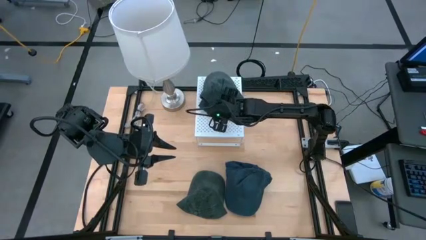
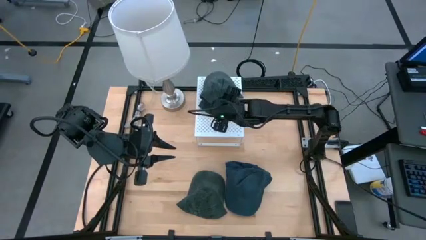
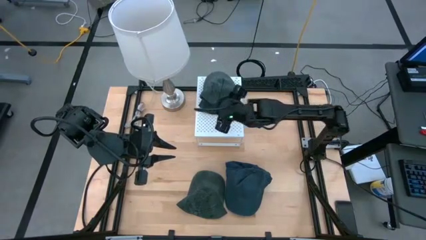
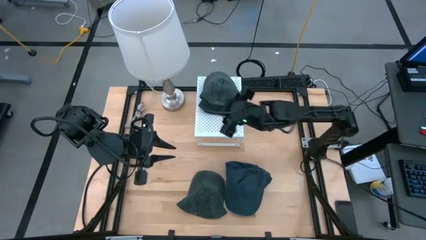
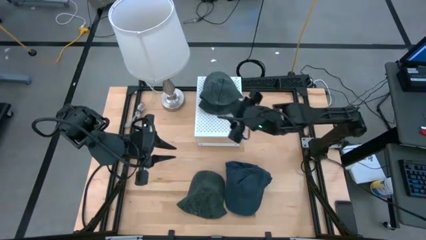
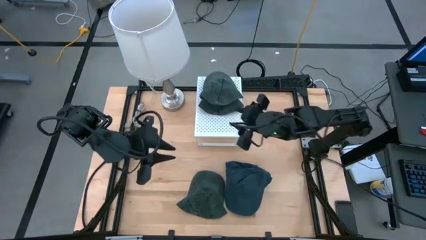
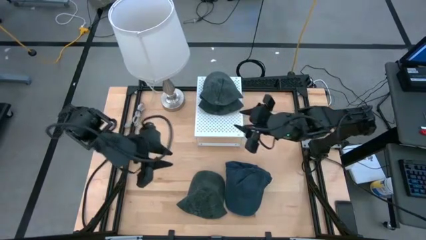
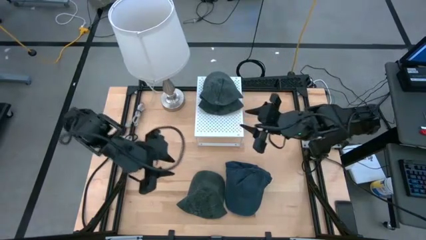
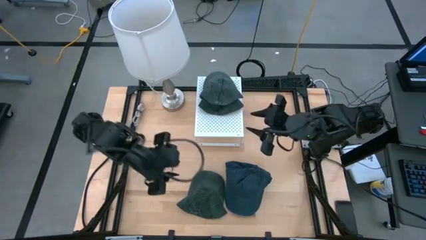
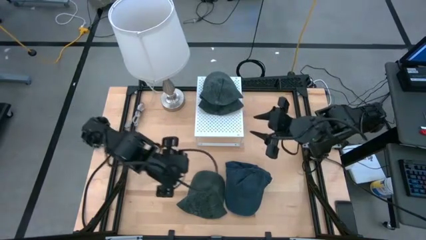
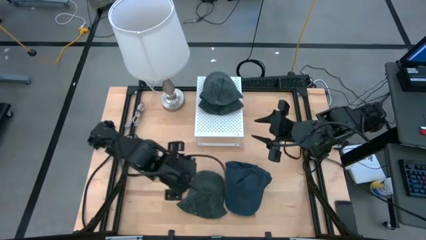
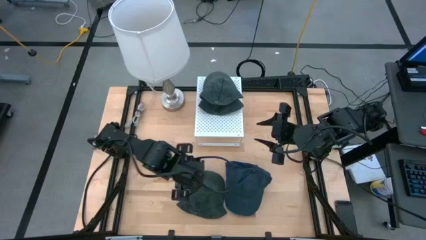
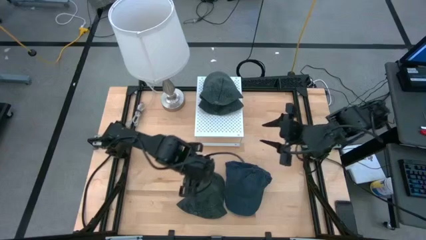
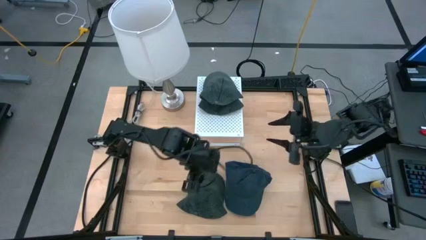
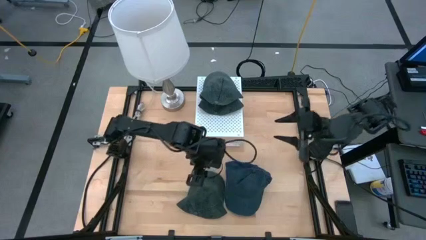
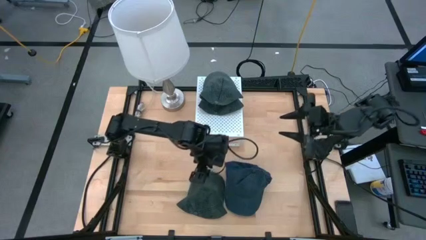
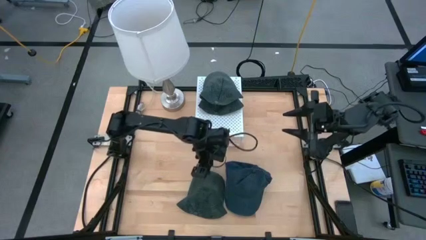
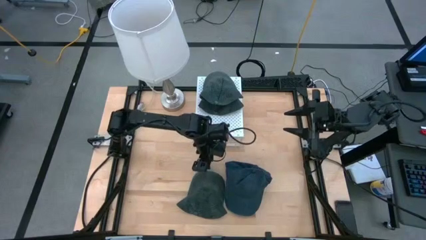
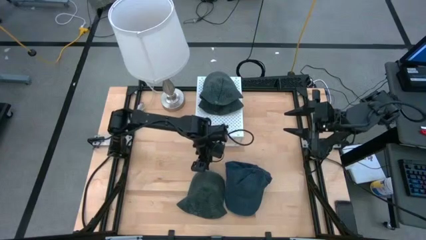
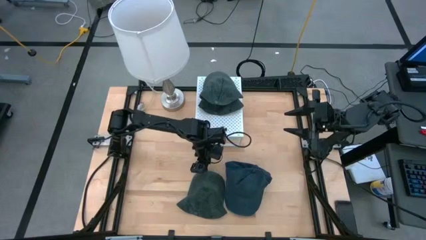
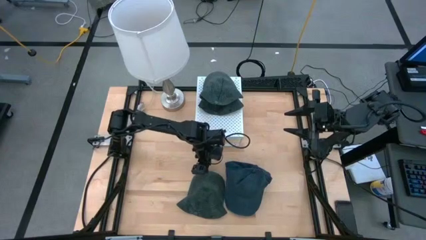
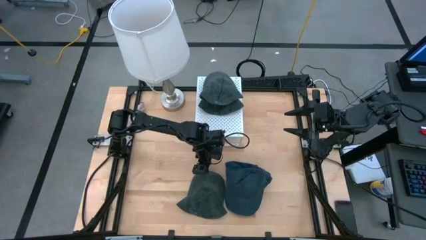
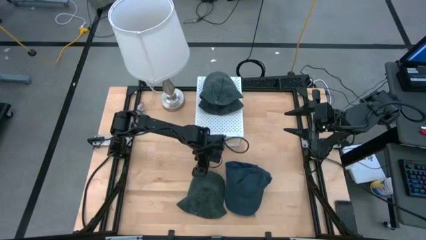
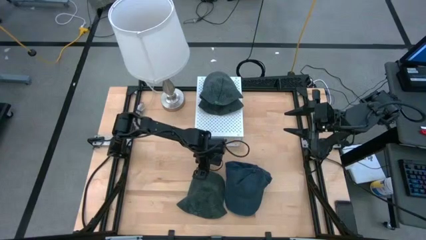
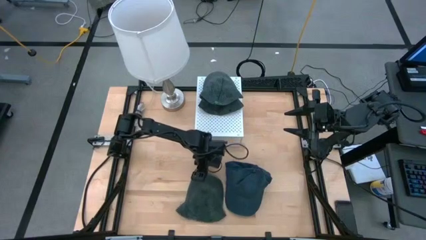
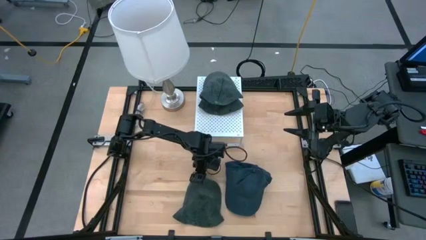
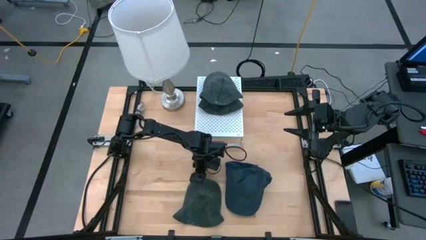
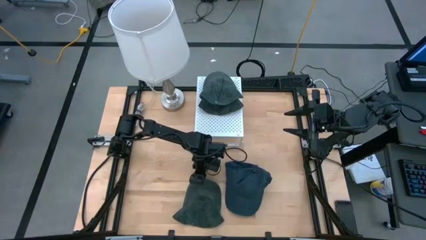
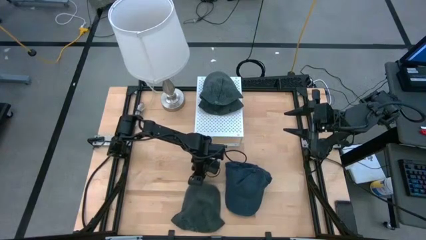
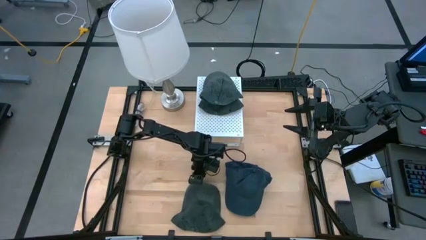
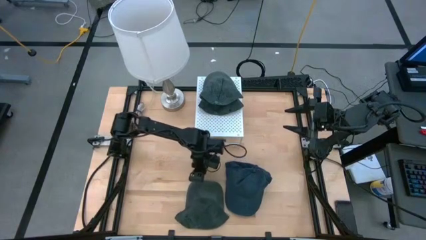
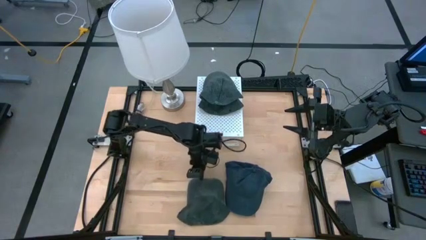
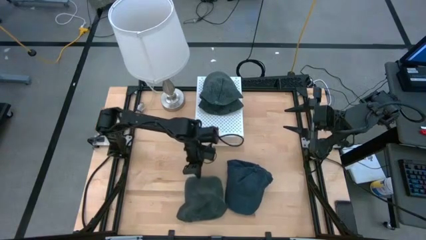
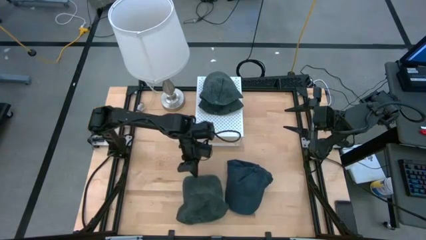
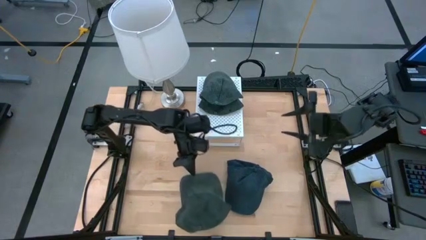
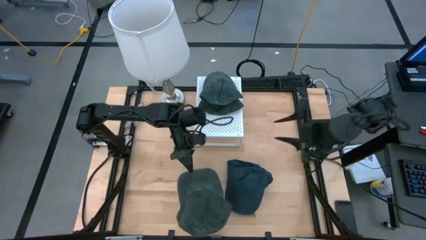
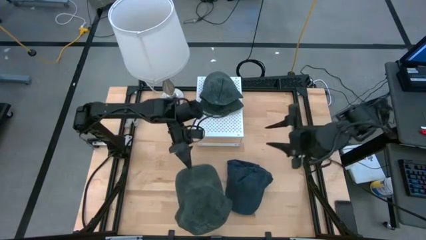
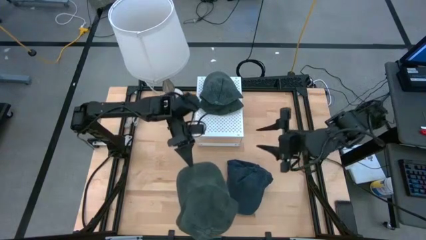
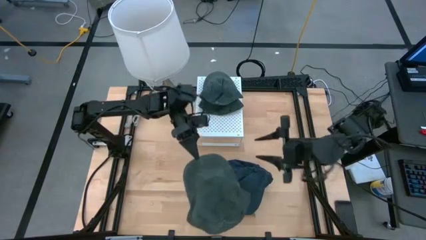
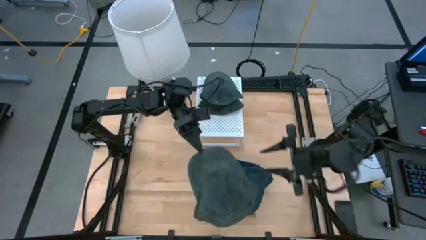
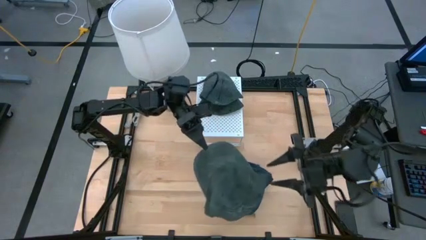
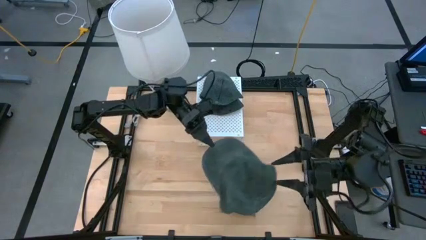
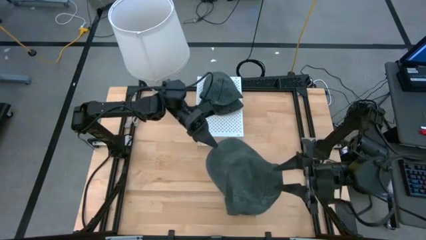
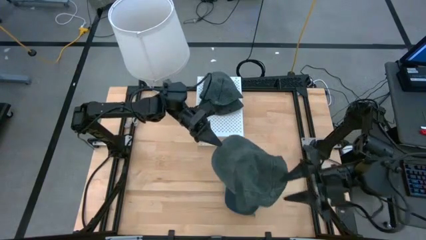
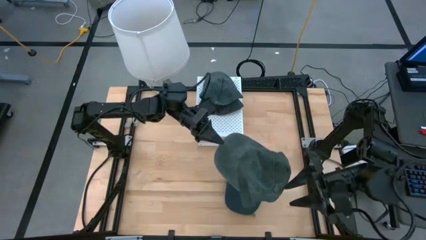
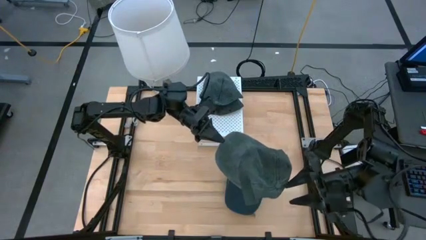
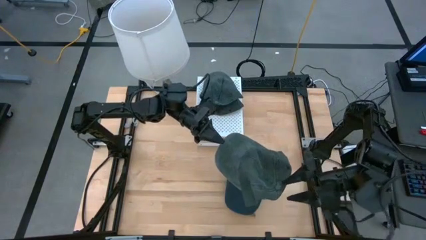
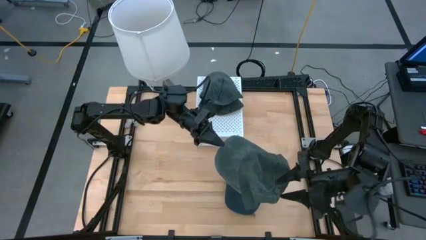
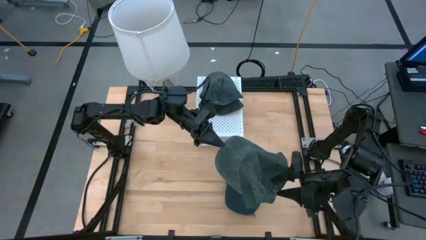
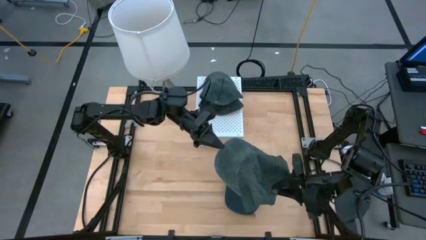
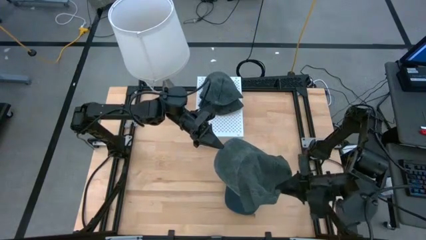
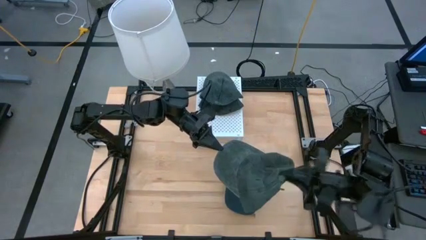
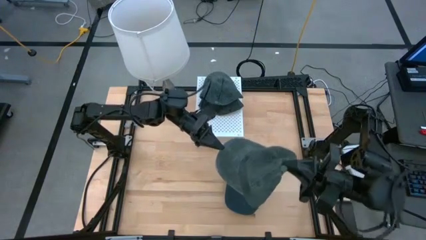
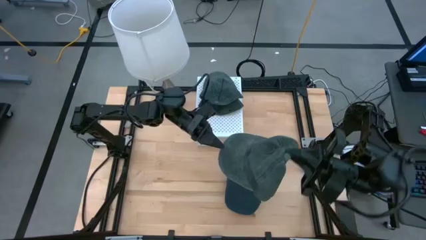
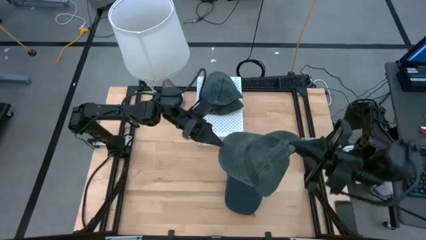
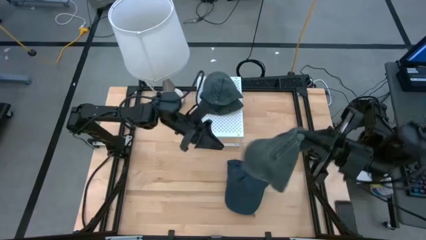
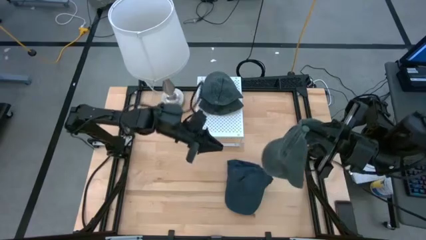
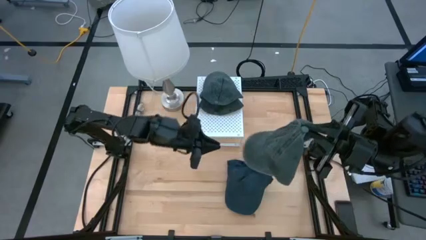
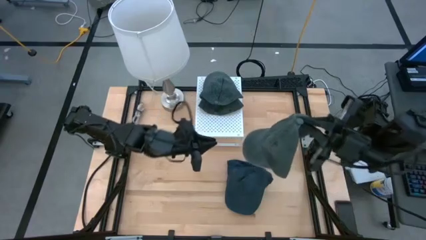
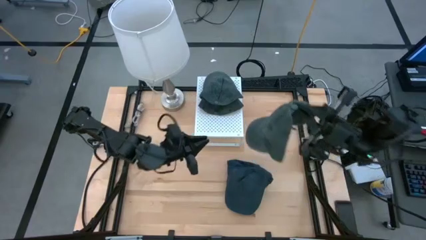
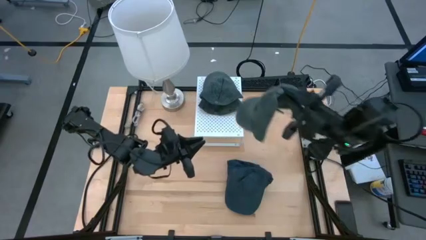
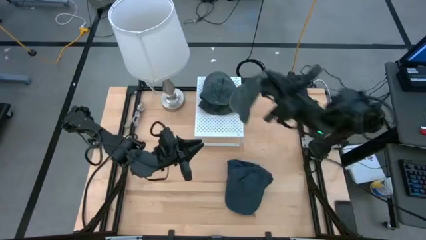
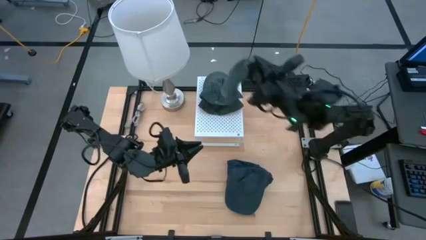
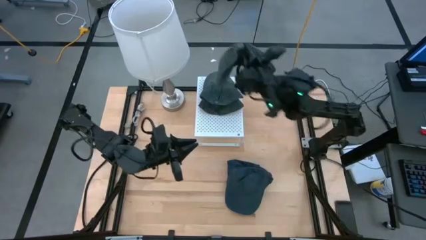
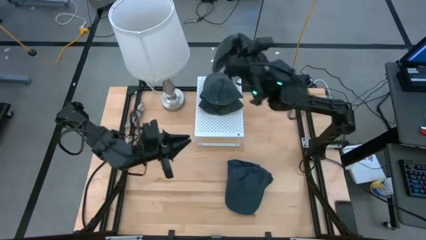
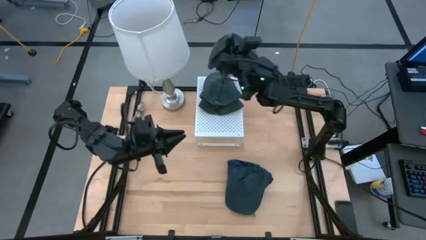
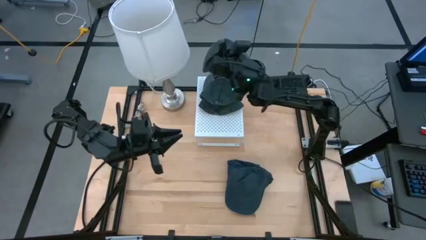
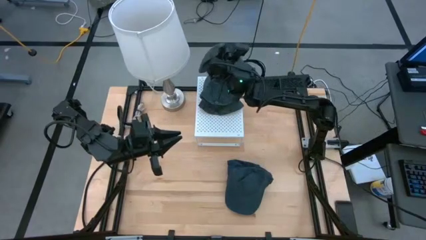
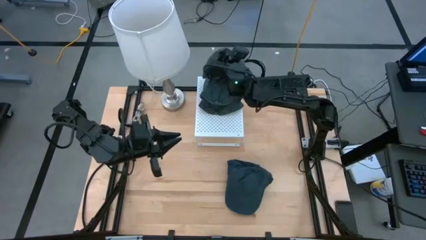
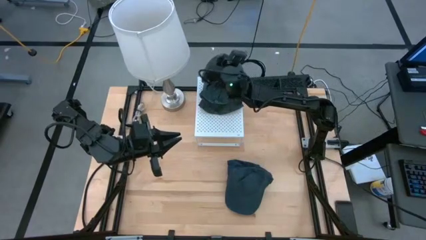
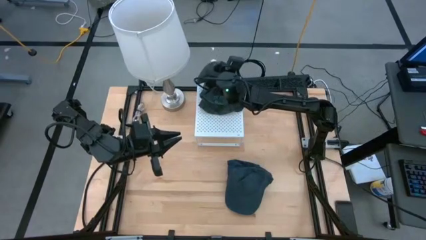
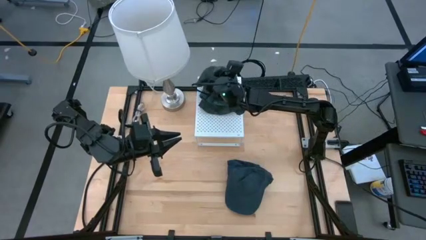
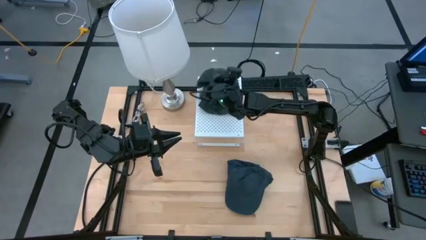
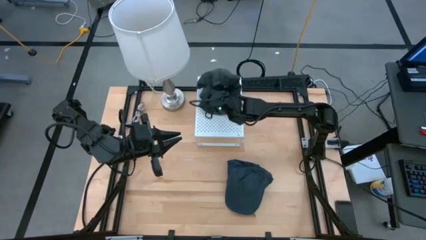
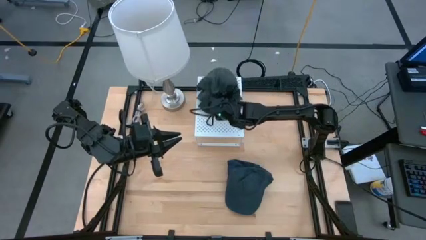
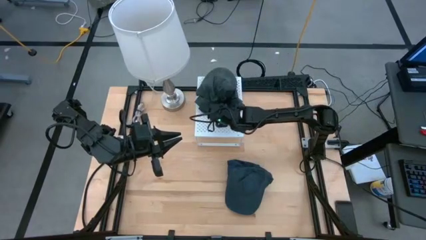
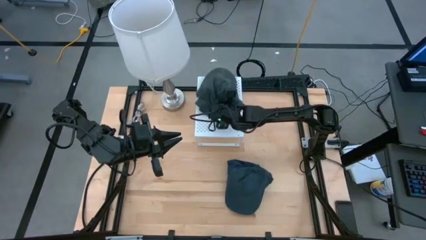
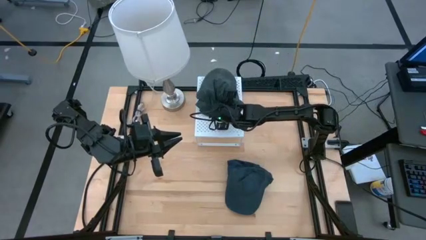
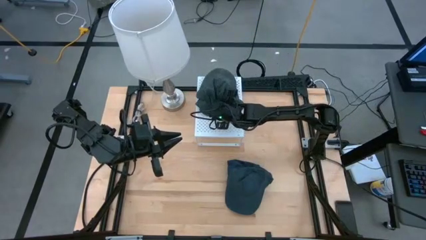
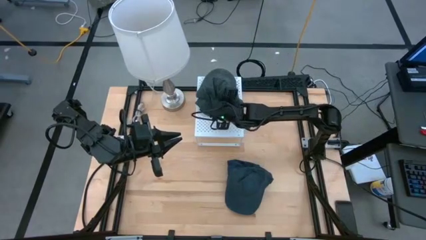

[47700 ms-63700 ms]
Task: Pick & Place hat
Stack the black cap on top of the other black caps on the shelf
